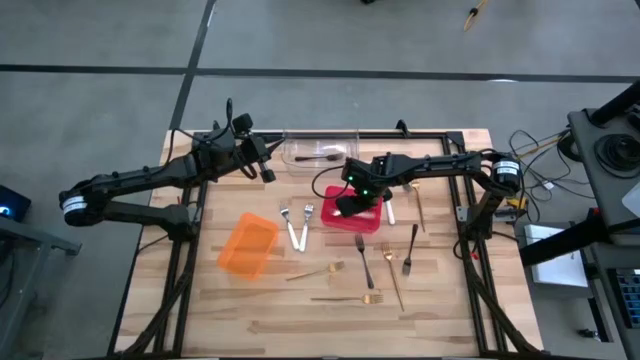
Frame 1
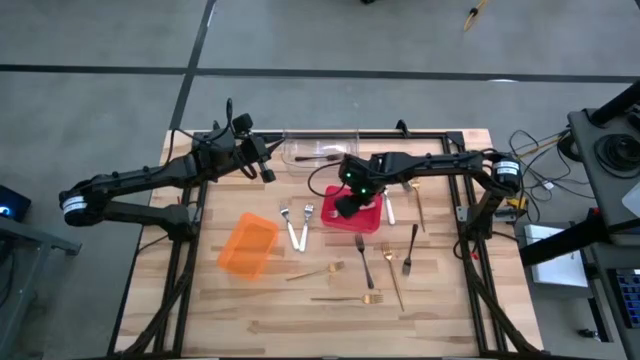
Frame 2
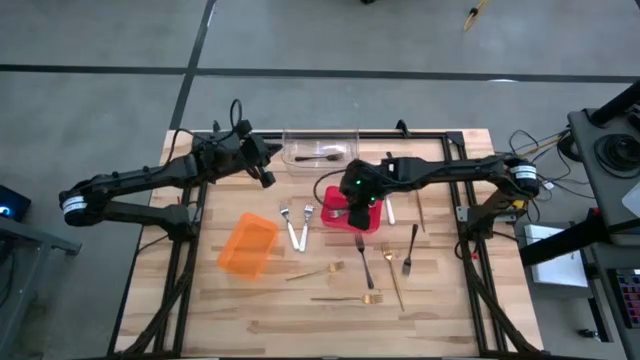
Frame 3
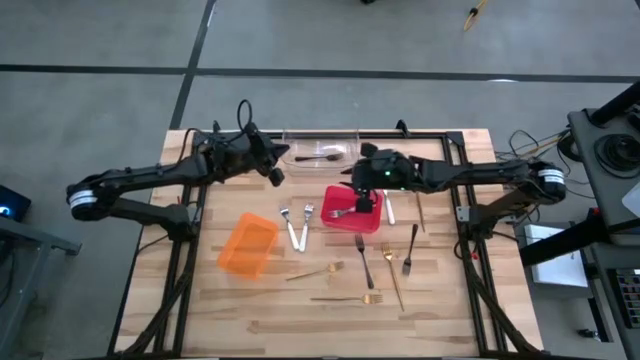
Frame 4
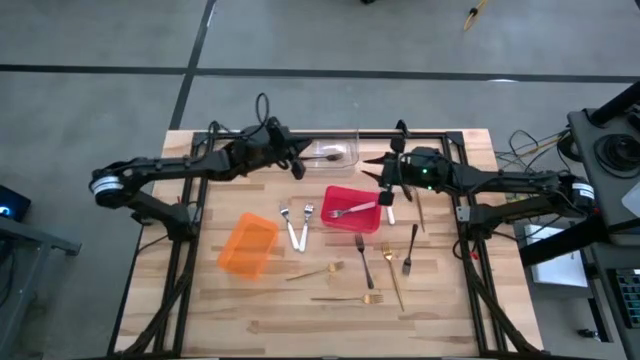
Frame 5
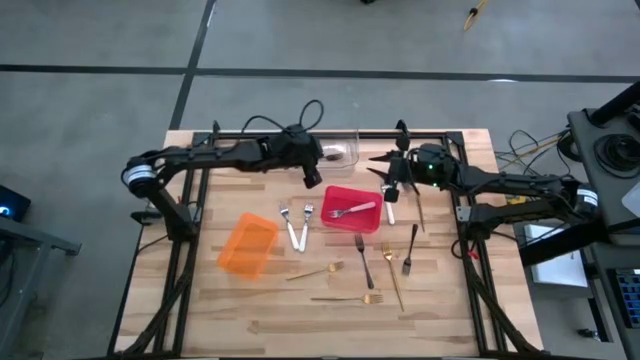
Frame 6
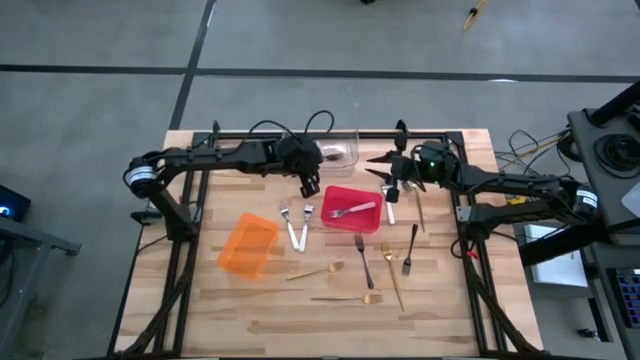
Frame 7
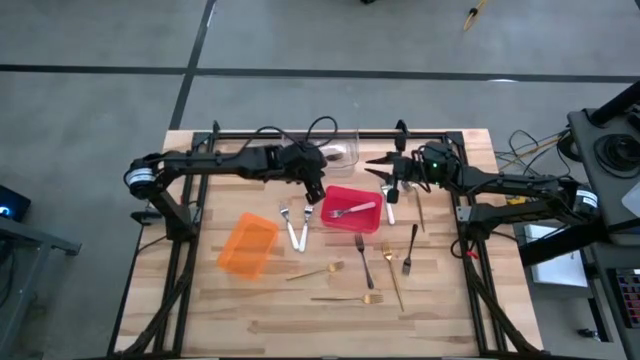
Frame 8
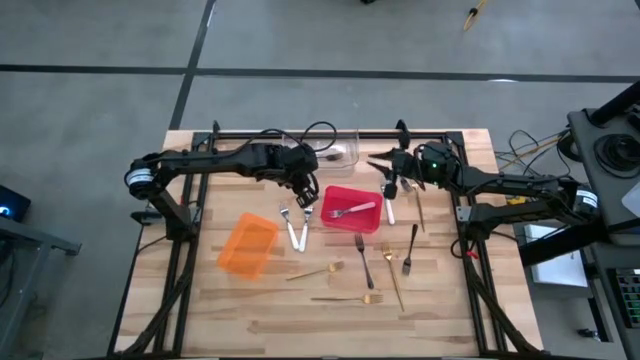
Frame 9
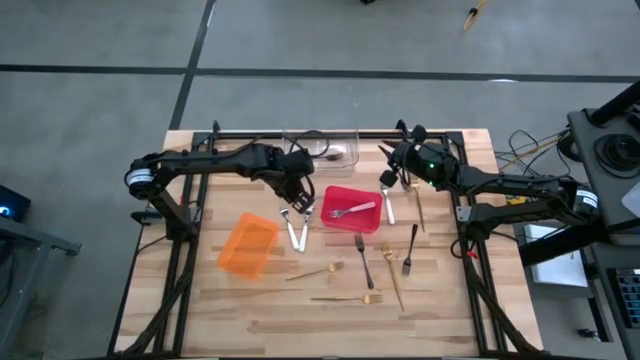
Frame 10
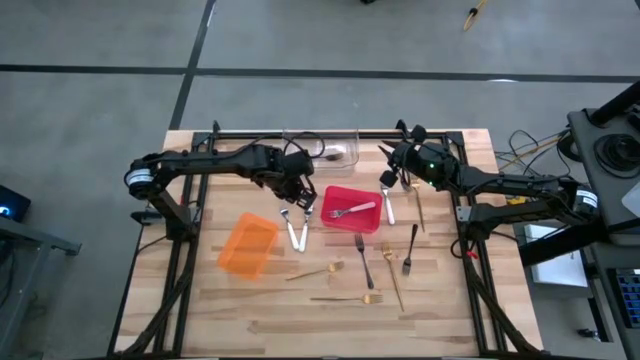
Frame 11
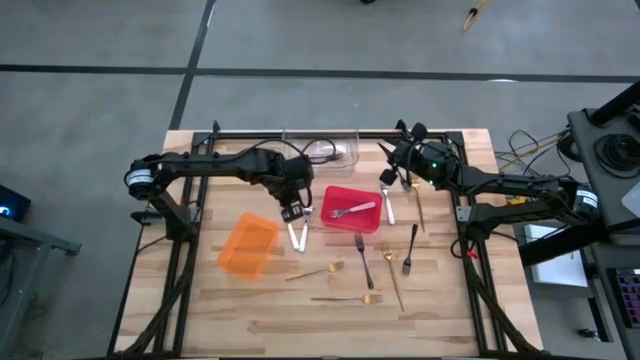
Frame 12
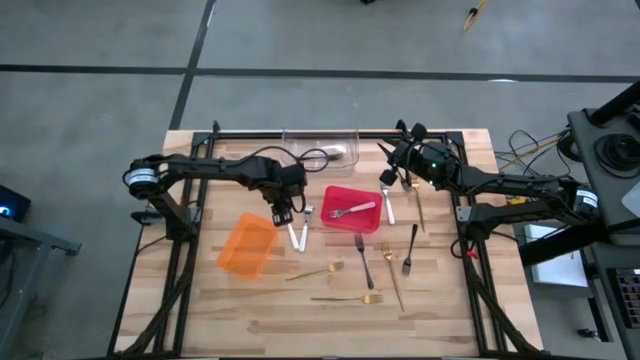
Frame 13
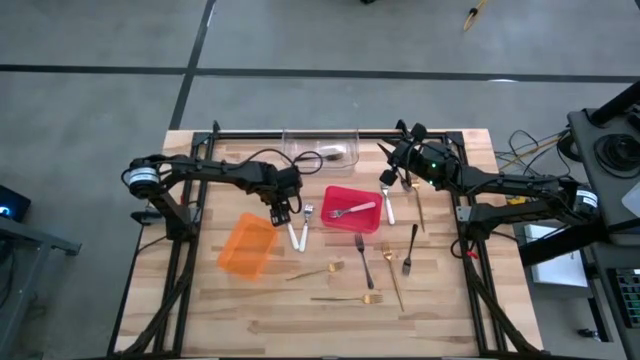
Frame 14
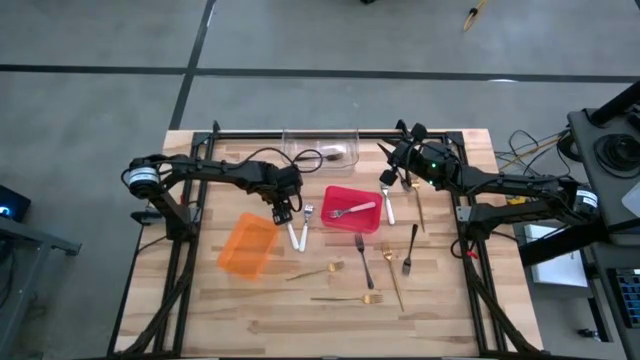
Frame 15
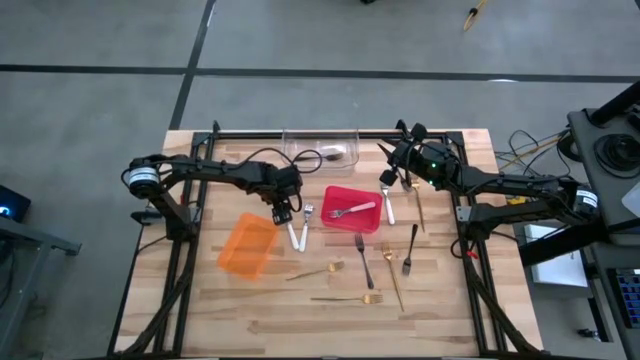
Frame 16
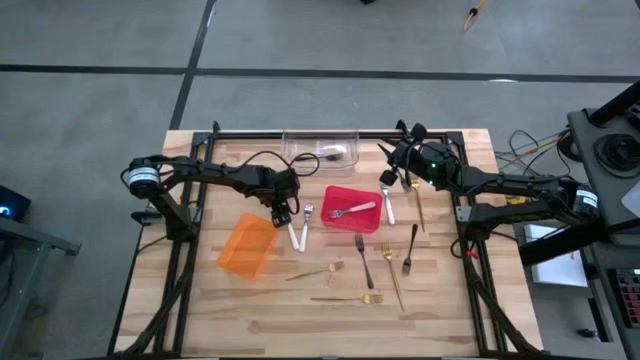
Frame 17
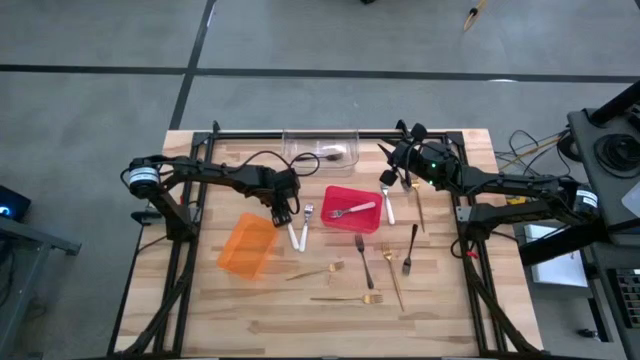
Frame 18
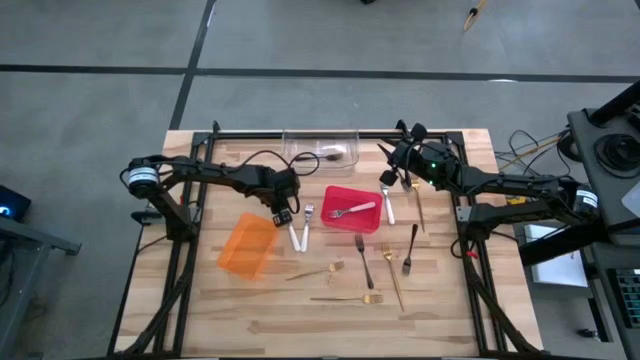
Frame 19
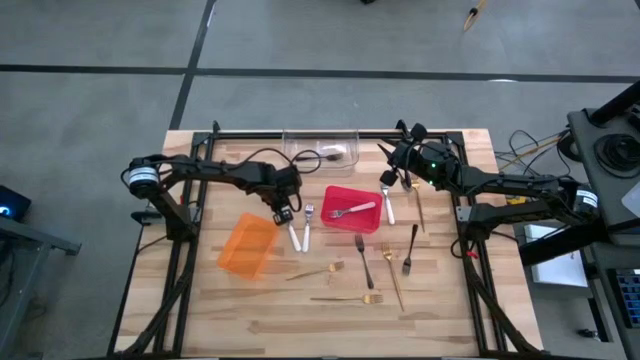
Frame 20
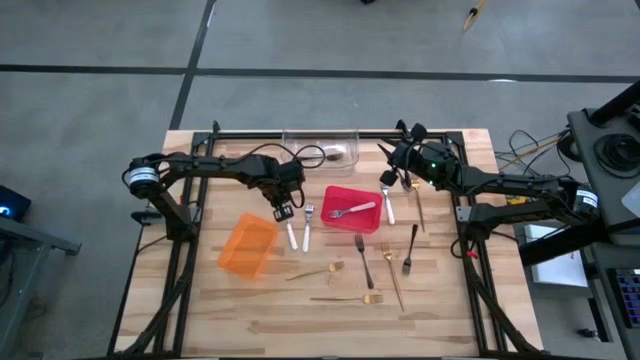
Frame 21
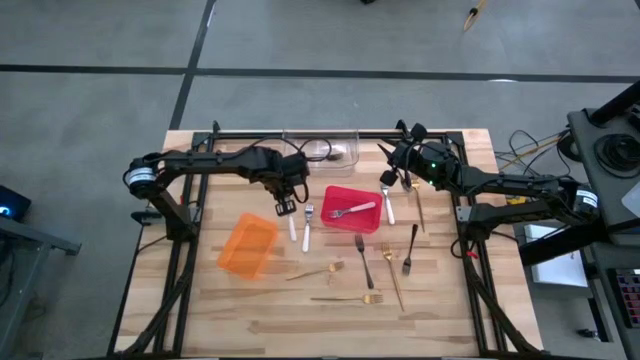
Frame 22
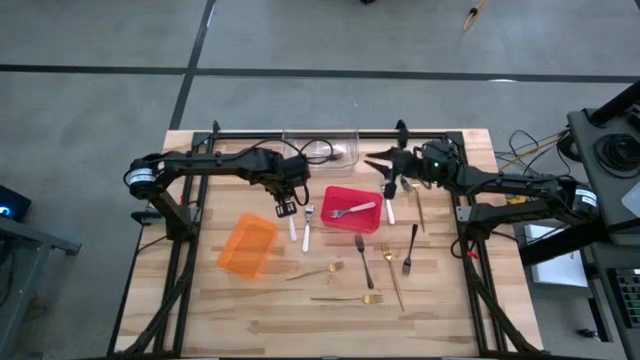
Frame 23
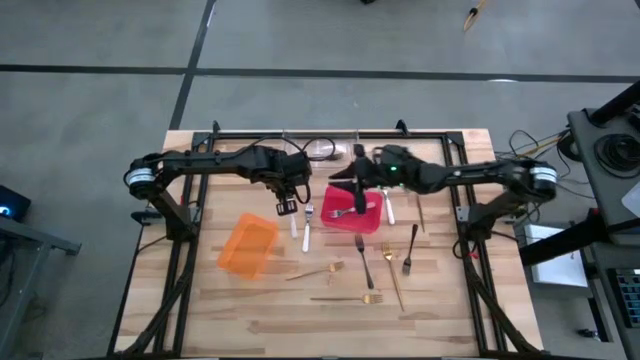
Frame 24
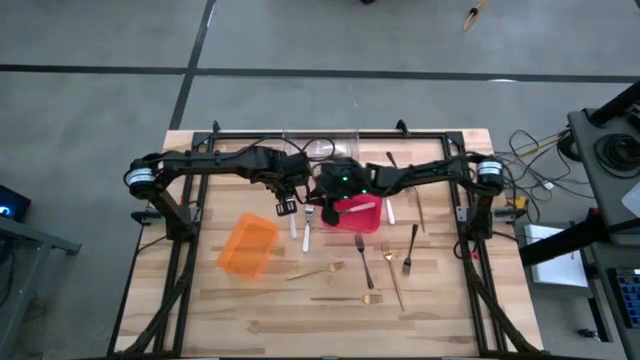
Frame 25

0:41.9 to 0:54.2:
Task: Sort silverware by color (type)
Put the white fork into the red bin
